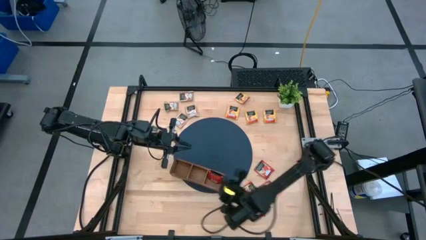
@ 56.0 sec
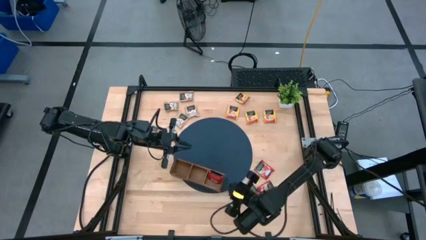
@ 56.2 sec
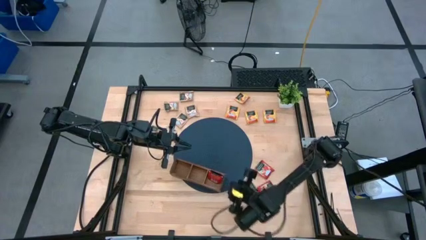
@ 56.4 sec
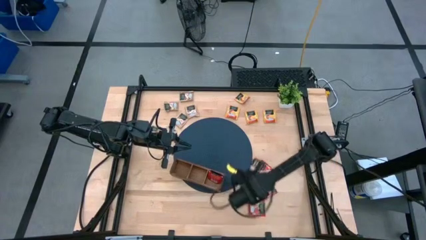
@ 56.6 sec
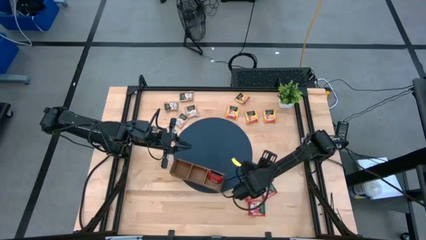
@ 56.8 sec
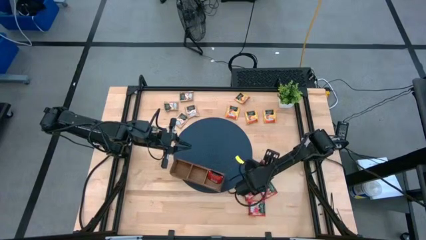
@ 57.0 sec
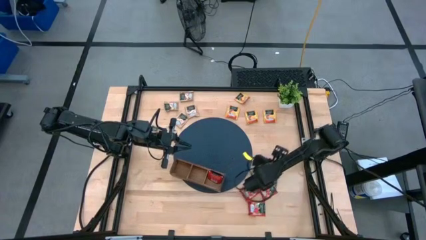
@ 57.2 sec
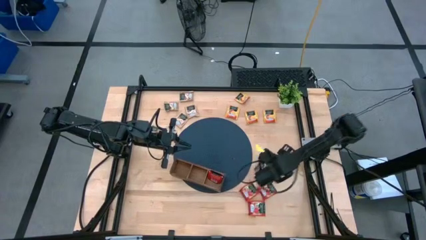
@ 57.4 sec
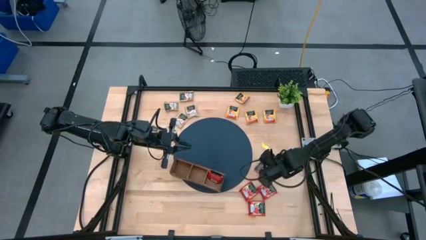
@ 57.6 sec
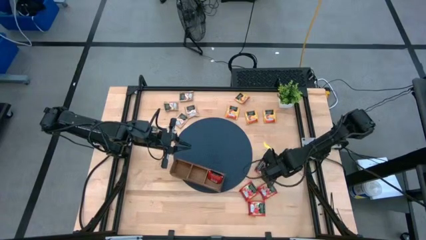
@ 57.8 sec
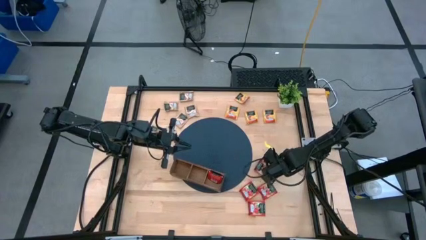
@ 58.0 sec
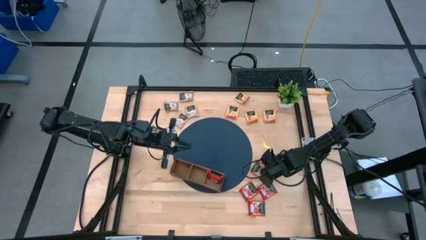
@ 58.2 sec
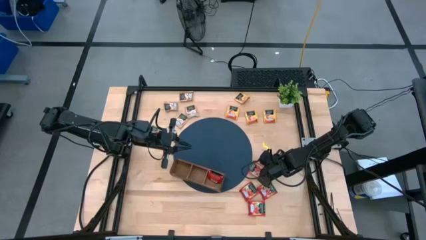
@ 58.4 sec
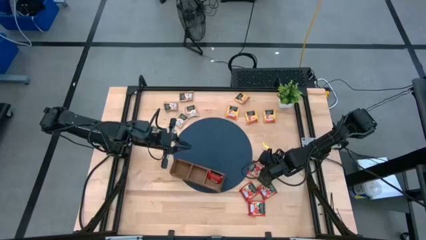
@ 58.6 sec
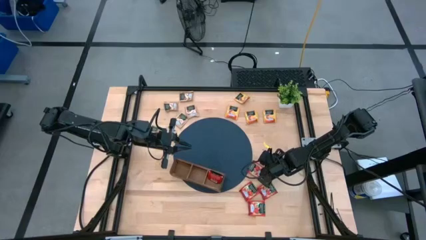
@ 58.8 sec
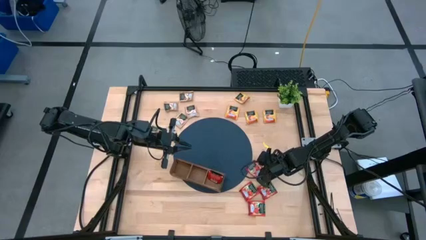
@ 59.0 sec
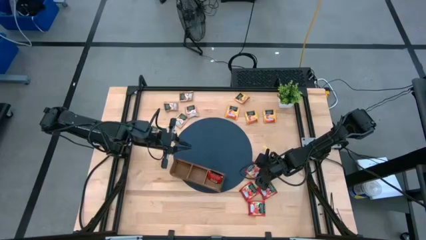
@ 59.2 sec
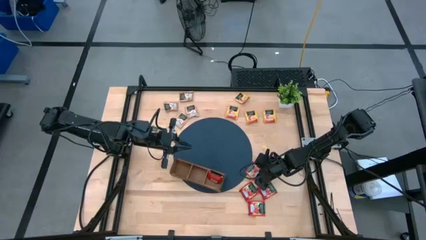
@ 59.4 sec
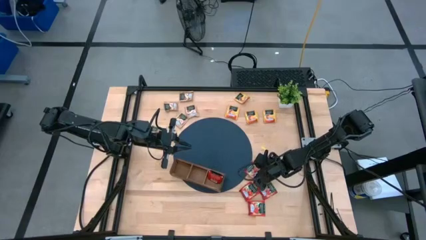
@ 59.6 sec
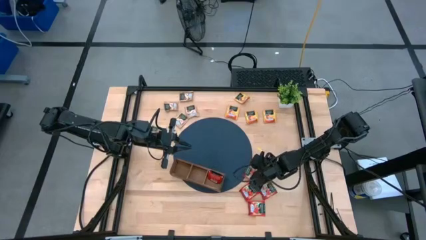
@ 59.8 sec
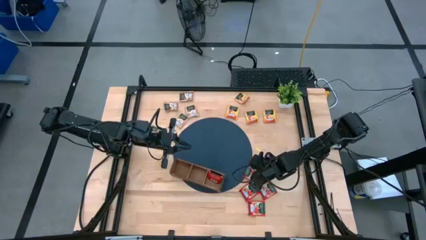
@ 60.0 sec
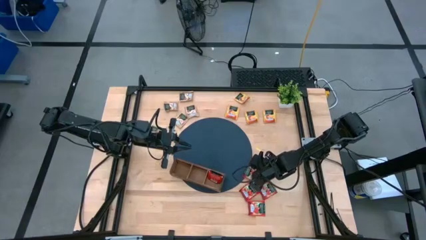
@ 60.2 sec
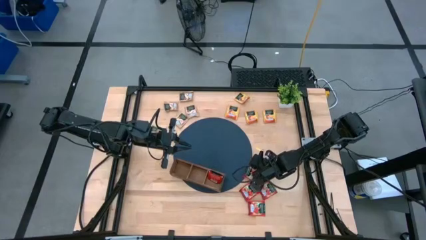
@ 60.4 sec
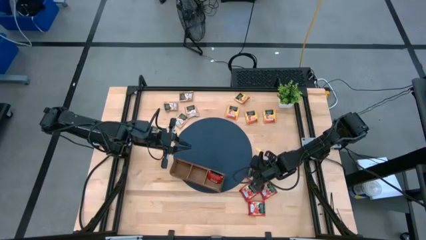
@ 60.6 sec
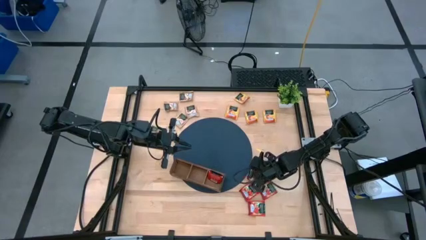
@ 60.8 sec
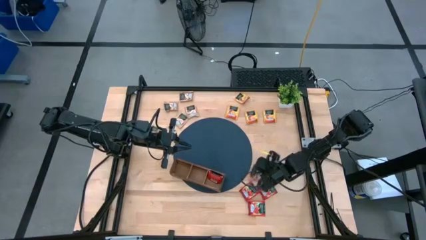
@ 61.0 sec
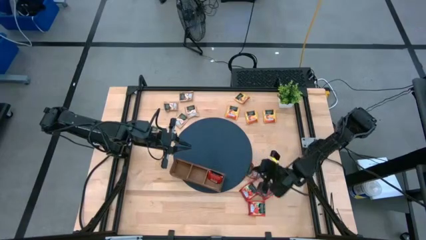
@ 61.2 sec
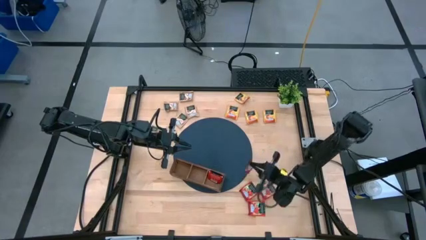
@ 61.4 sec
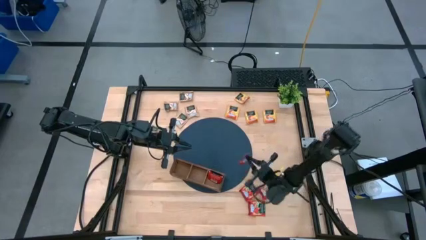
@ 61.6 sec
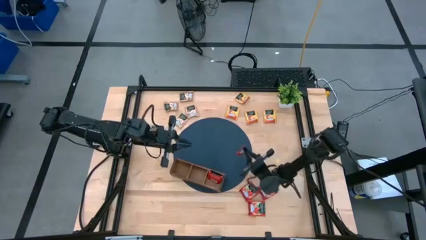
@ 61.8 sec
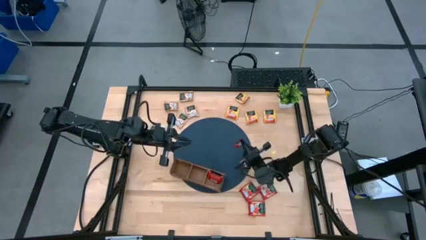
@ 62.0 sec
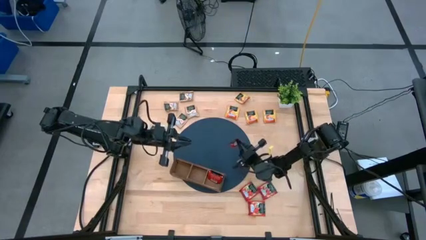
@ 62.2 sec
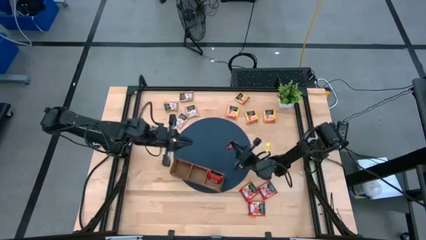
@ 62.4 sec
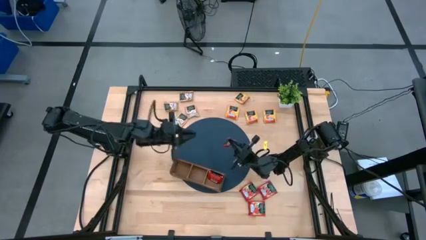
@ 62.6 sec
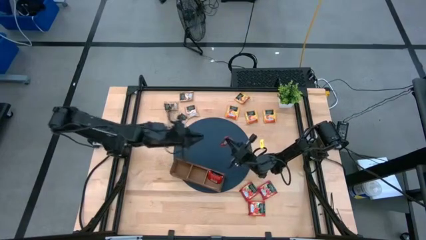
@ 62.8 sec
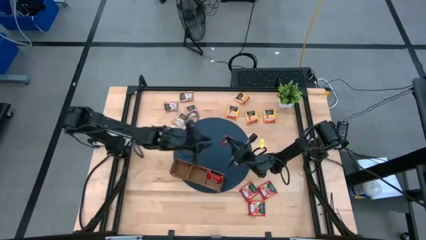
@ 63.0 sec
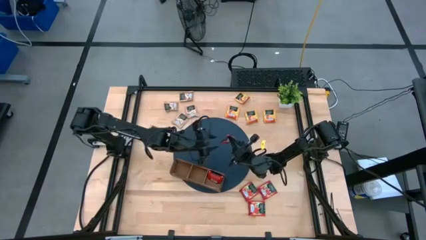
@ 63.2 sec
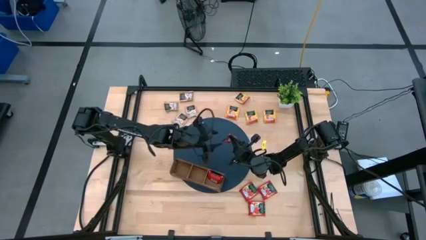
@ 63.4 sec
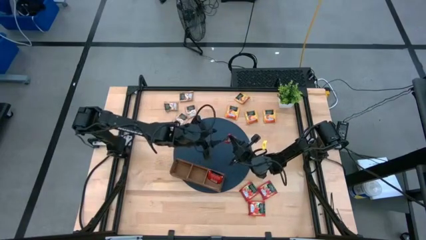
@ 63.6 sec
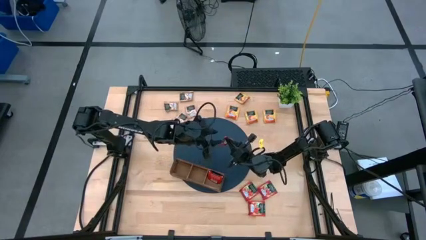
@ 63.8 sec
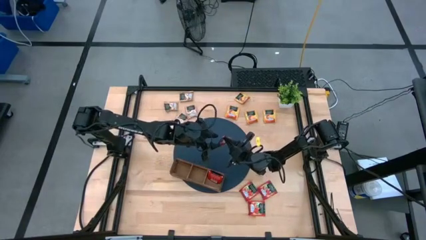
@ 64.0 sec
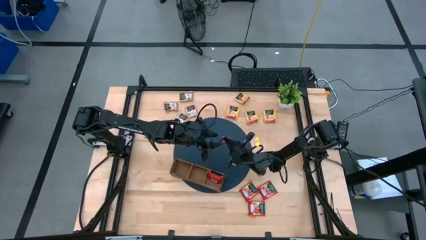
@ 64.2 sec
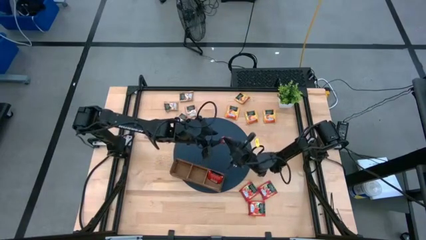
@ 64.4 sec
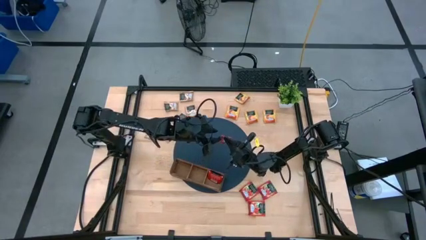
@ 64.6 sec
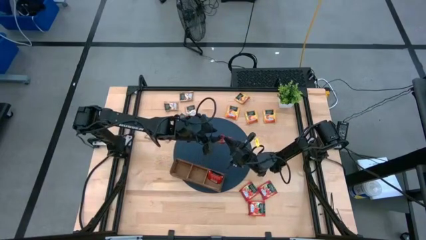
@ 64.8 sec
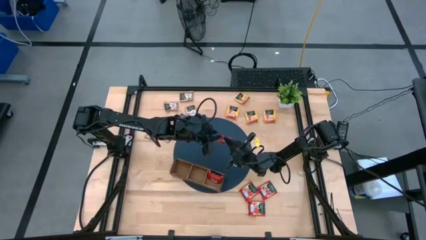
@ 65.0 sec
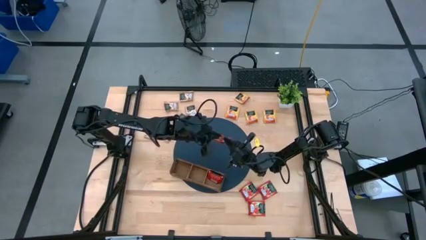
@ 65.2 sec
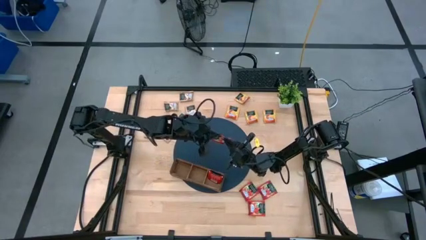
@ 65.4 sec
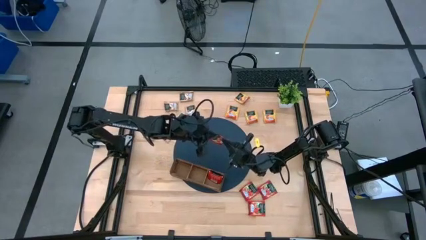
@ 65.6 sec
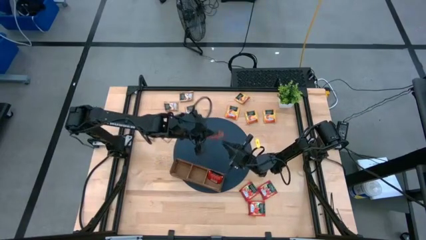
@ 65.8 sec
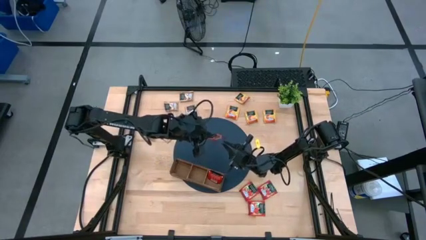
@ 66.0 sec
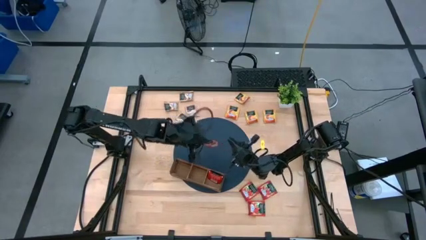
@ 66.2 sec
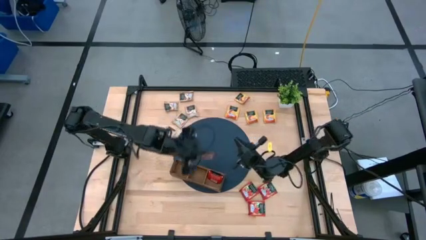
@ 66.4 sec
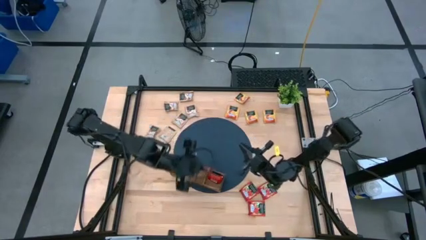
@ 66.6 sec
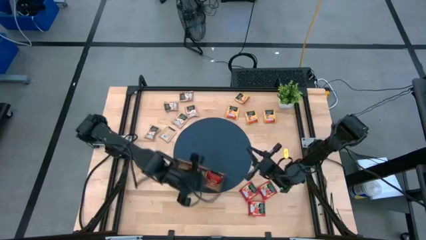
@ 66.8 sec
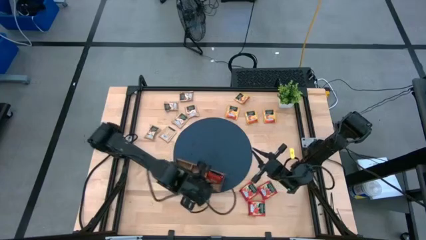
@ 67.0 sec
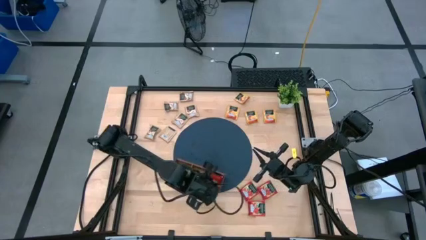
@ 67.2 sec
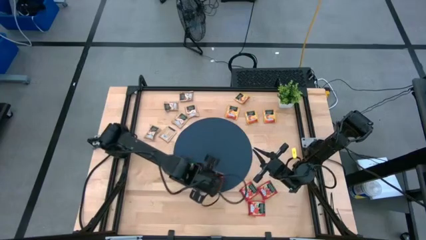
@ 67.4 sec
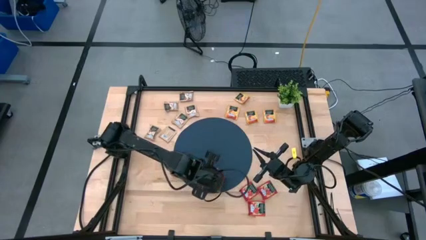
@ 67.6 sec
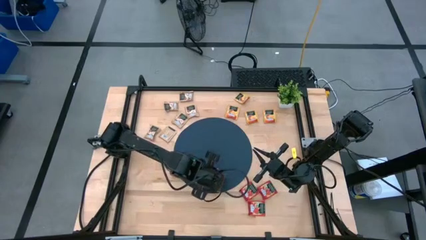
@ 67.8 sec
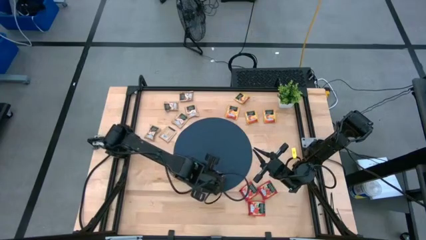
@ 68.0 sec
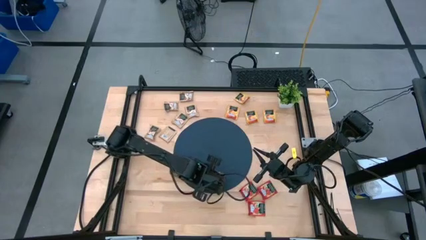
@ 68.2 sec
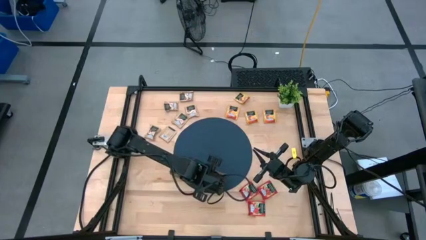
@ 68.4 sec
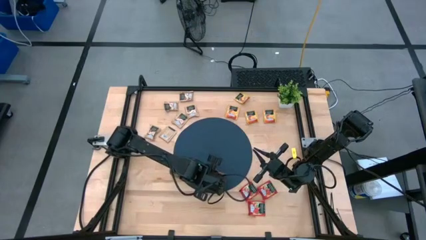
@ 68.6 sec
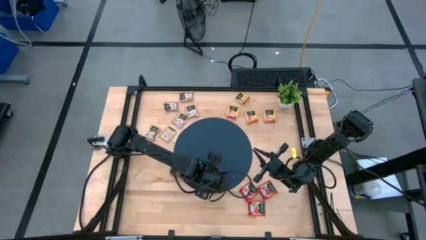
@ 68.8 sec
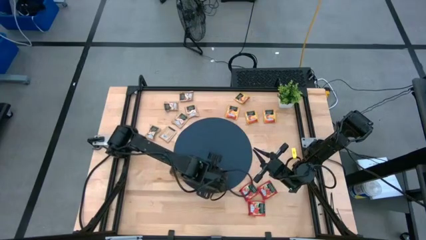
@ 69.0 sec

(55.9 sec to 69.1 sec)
Task: Pick & Place Tea
Put the red tea bag into the right section of the wooden organizer

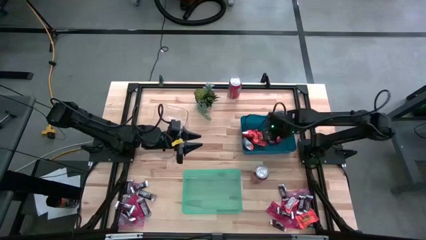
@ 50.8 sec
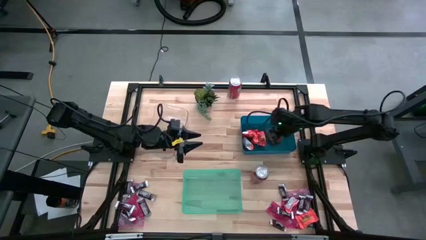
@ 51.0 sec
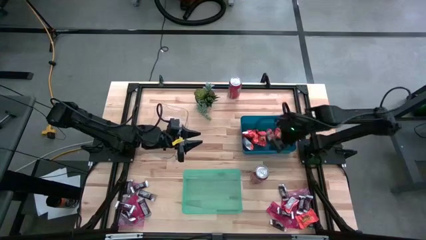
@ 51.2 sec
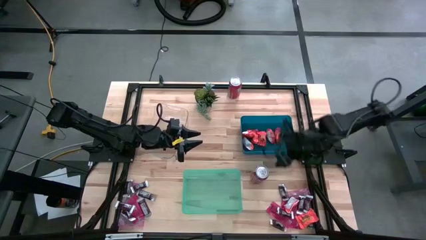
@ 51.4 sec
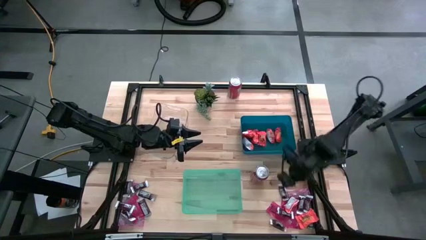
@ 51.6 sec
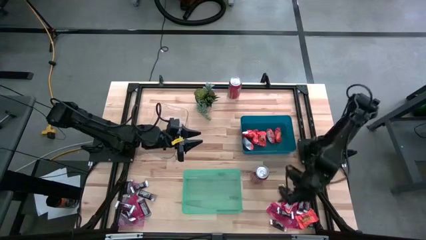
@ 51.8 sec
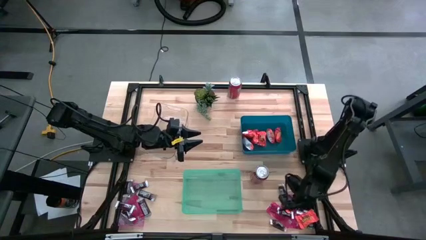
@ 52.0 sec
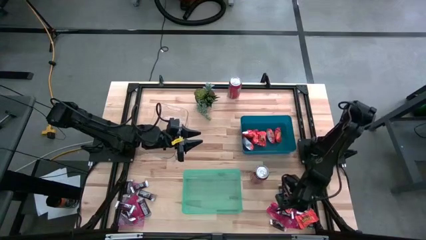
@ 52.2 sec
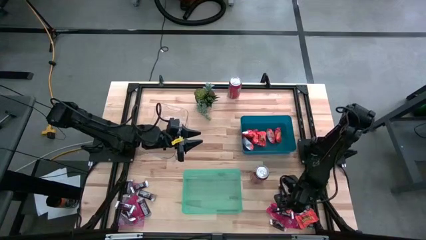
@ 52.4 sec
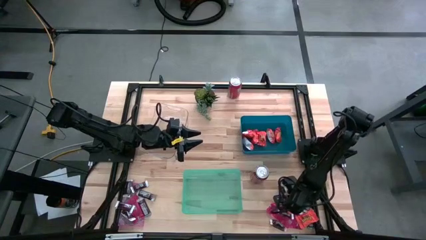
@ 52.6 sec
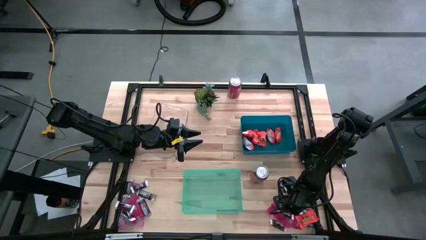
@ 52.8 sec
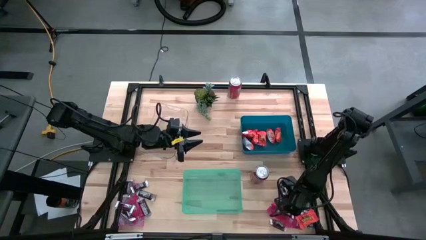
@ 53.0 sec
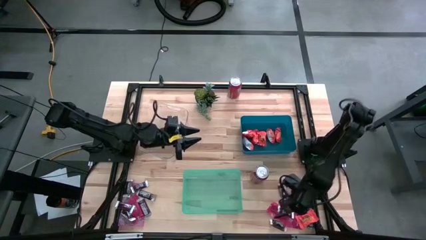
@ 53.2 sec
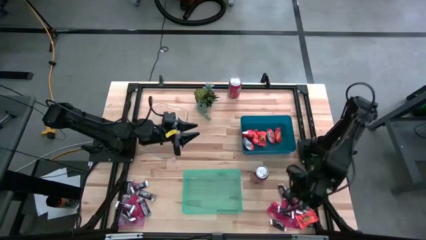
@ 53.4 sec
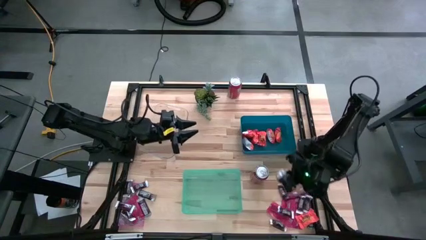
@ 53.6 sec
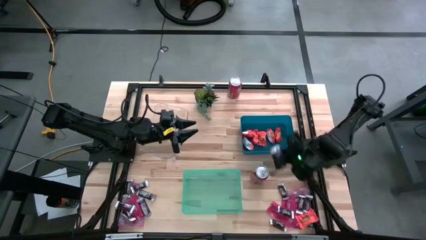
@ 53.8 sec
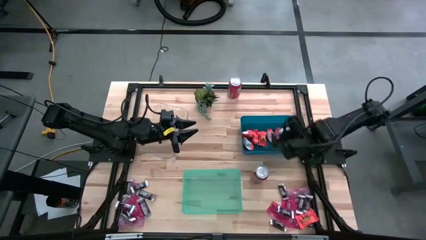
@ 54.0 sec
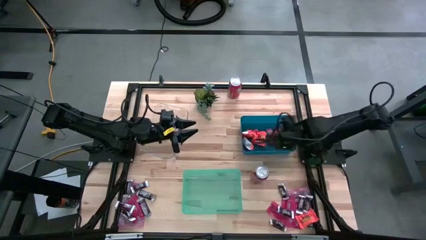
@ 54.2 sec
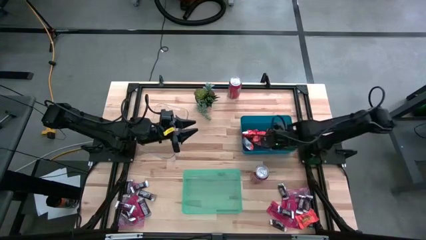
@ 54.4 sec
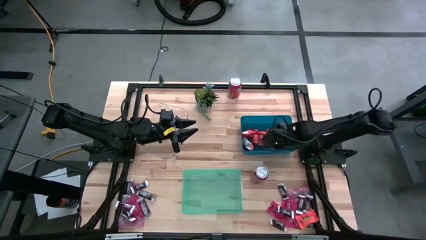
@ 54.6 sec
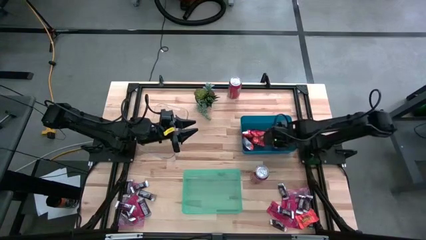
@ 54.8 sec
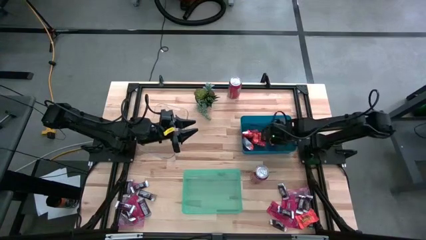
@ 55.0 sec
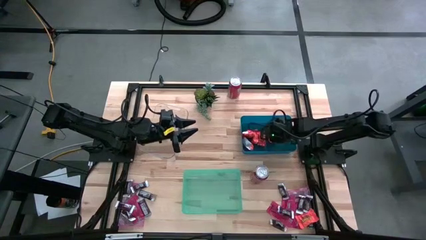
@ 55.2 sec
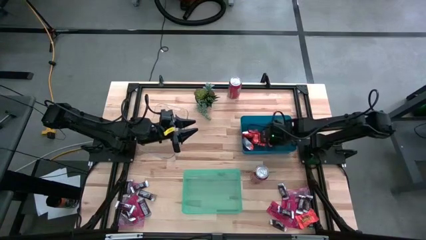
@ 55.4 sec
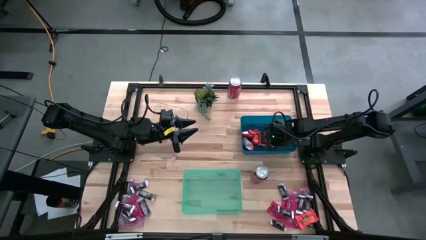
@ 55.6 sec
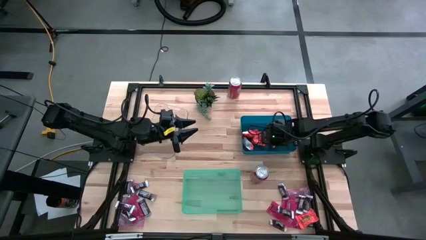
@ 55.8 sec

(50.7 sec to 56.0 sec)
Task: Sort candy
Put the orange chocolate into the blue bin
